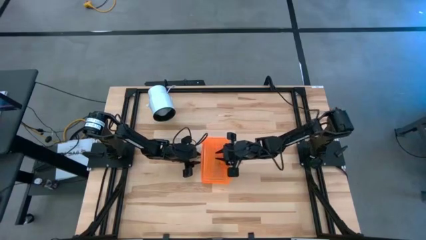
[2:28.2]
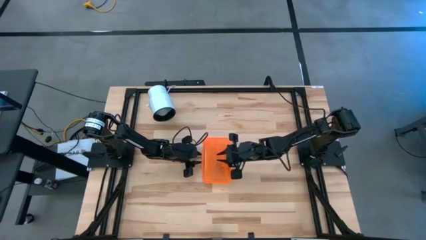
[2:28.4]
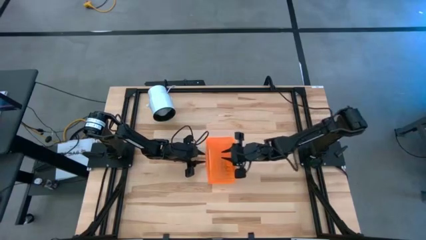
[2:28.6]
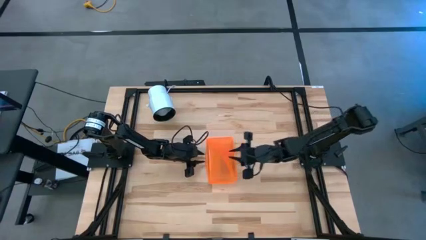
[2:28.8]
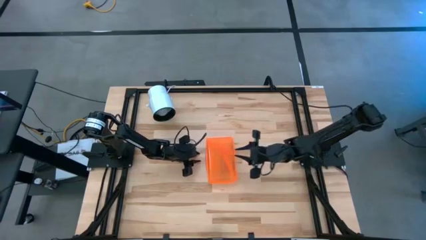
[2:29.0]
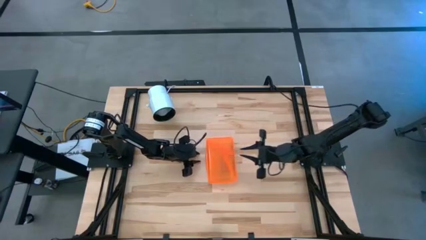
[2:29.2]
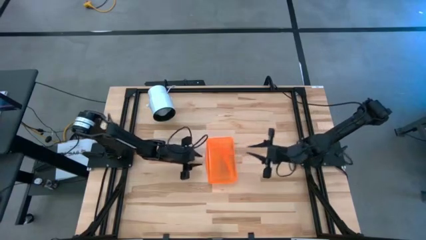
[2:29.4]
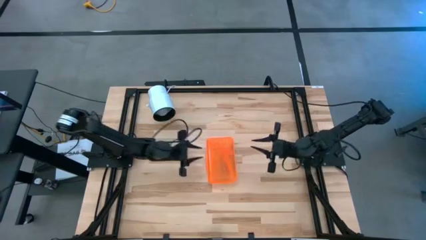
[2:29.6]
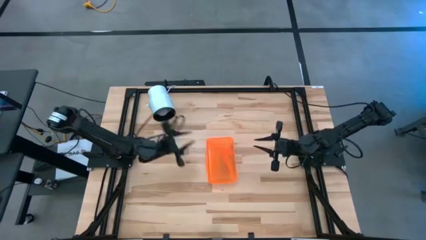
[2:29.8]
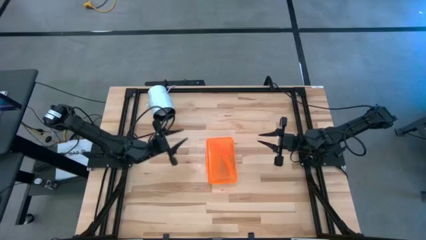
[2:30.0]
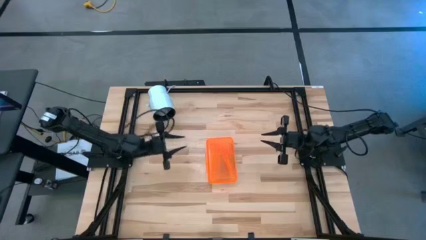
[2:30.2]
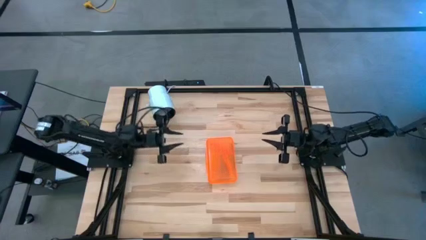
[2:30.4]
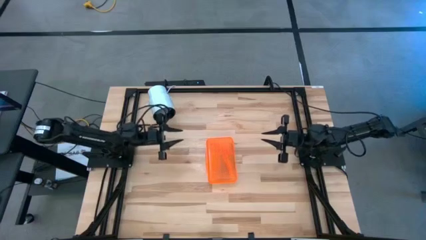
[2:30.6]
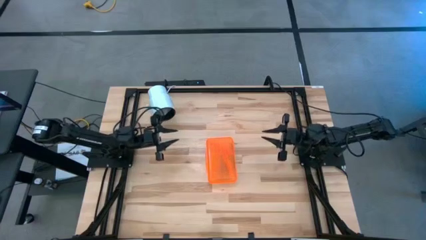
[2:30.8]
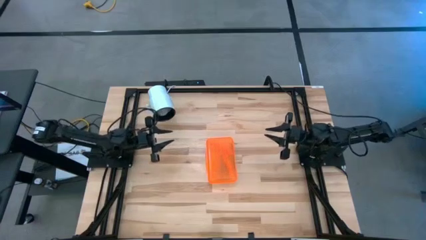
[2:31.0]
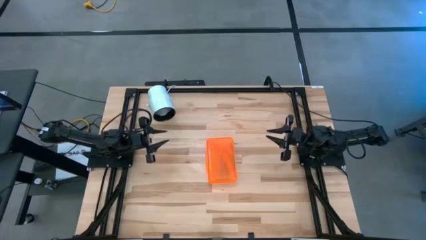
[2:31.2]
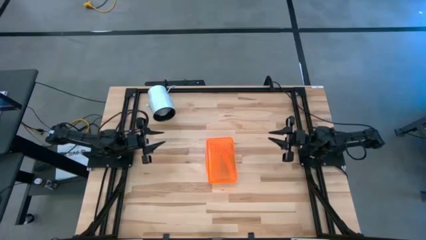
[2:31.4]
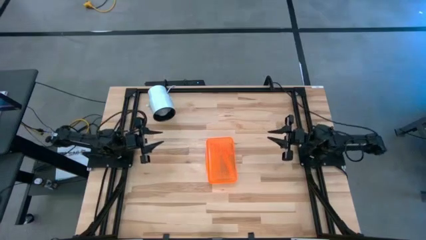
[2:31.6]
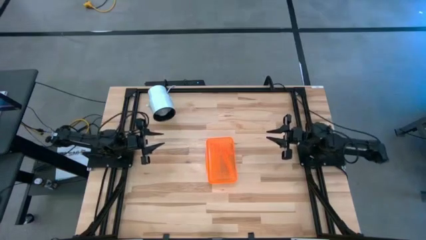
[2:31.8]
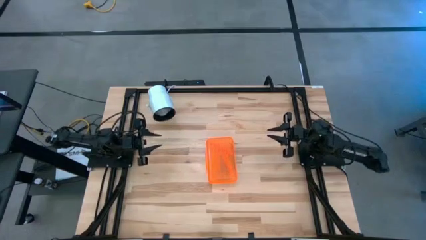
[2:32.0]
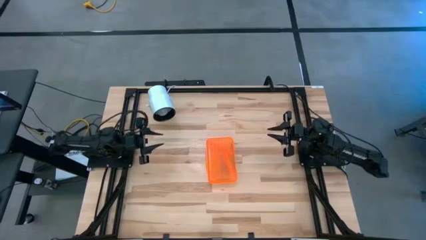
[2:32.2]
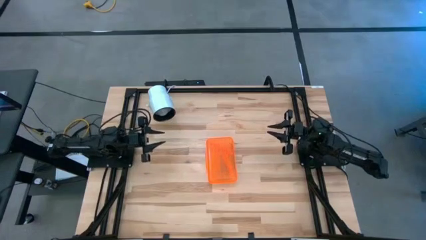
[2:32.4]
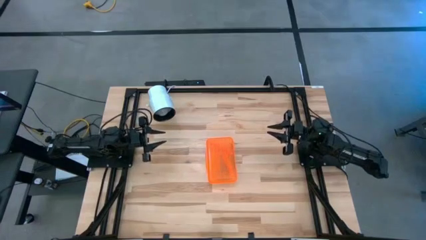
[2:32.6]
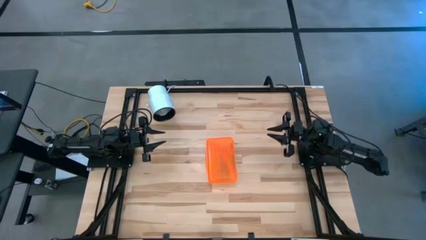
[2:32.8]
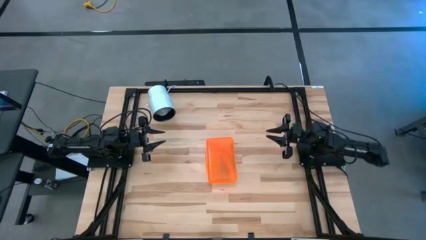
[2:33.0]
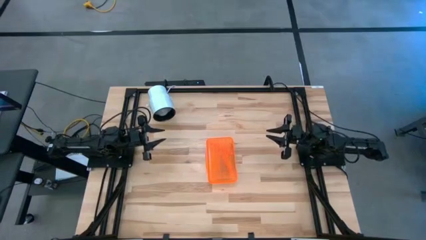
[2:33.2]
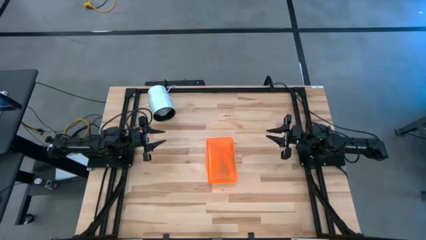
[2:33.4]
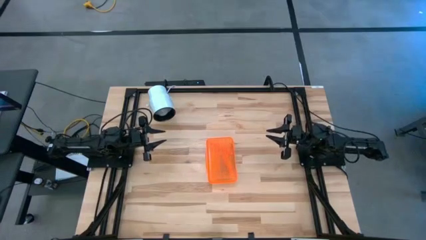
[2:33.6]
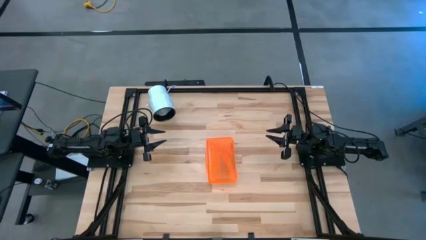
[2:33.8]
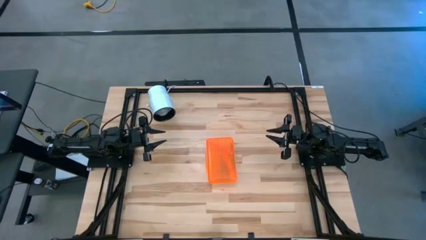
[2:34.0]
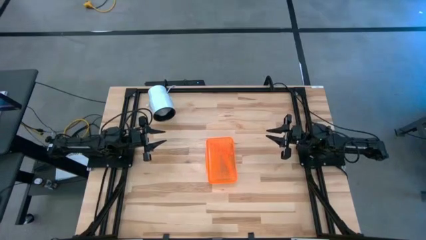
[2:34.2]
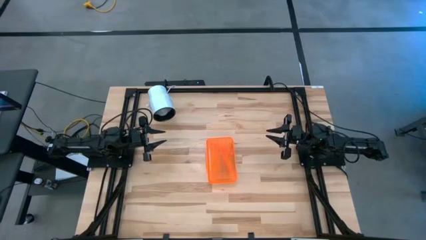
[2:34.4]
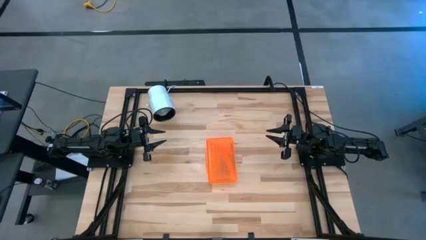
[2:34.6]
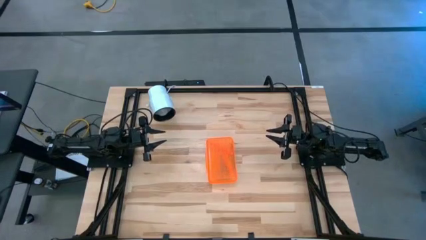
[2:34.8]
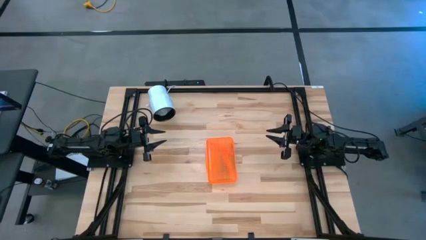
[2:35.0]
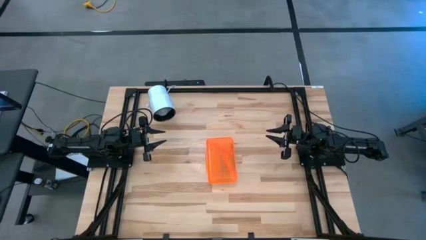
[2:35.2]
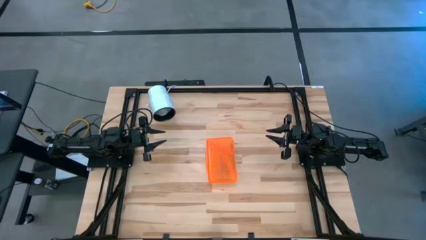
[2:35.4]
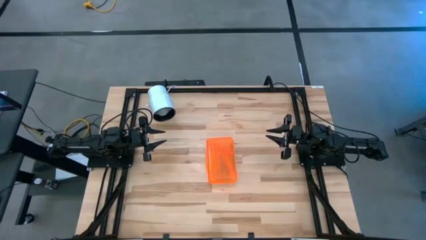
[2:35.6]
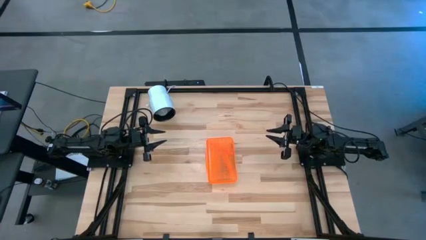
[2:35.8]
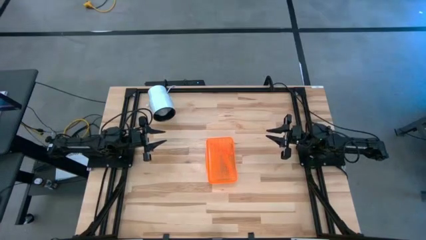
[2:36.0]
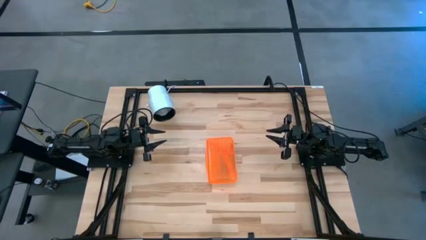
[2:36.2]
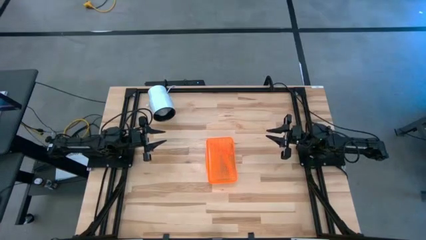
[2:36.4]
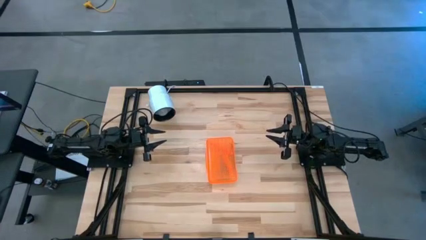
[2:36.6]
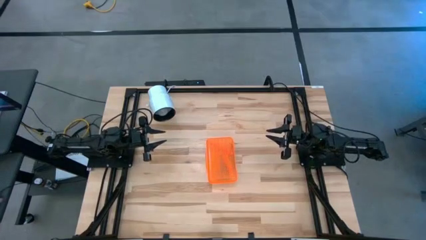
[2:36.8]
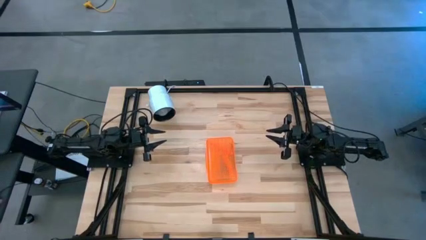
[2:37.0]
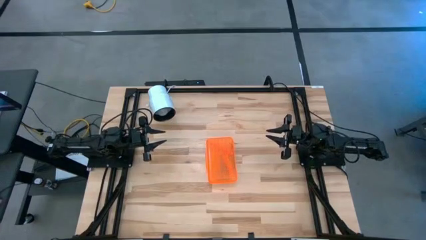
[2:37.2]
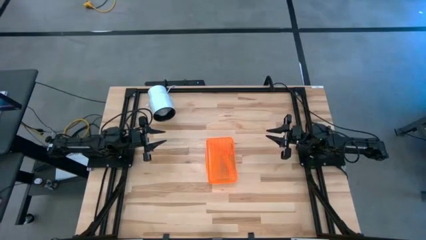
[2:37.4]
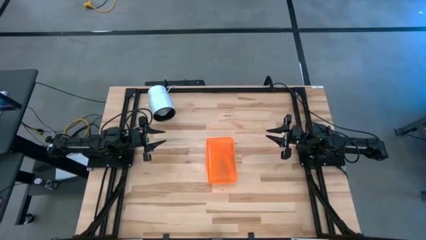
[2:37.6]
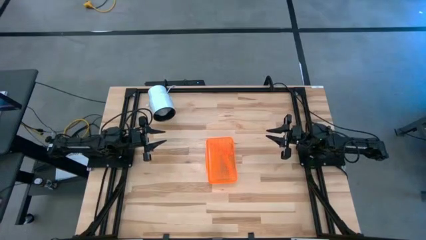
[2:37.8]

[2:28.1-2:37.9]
Task: Pick & place school supplies into a supply box
Return to Home Position
